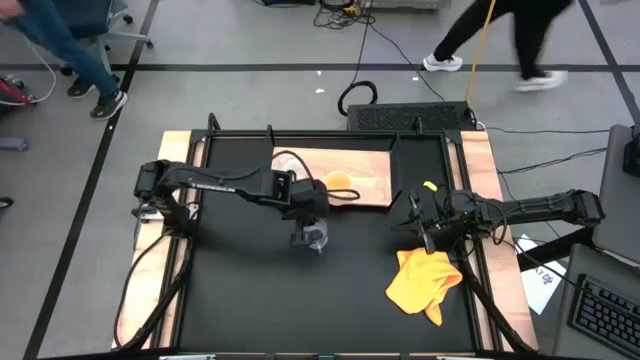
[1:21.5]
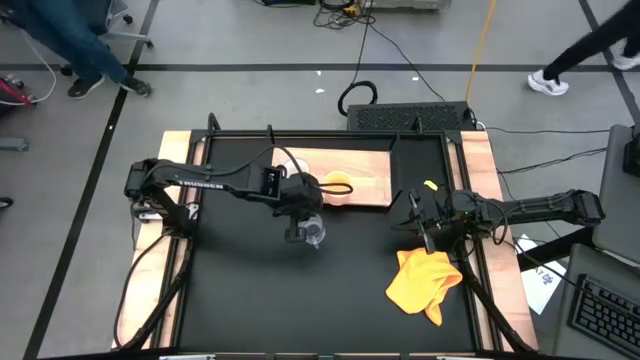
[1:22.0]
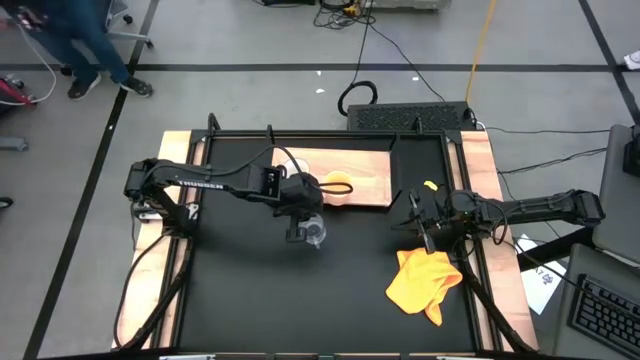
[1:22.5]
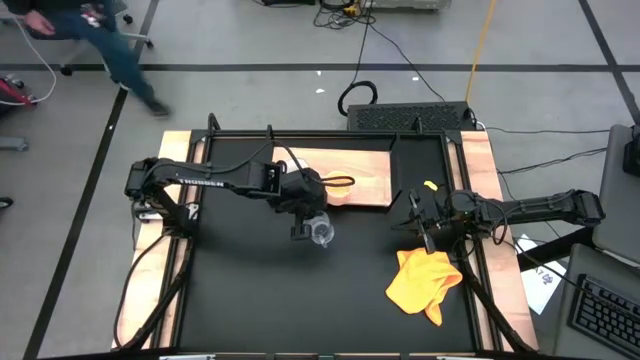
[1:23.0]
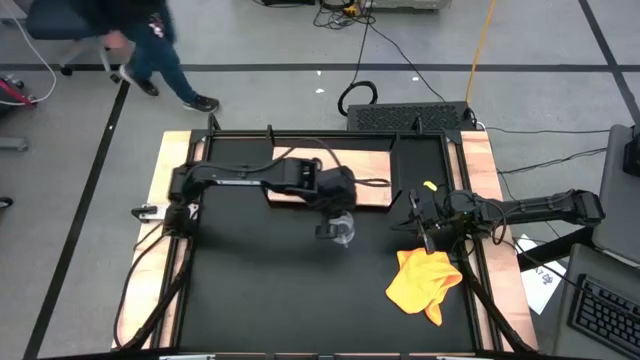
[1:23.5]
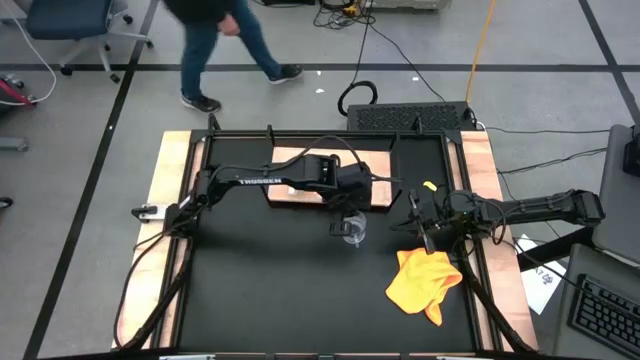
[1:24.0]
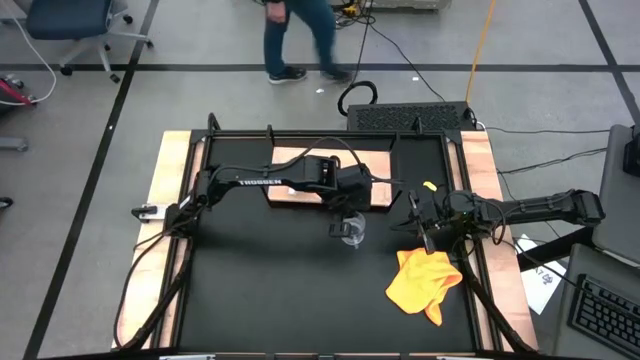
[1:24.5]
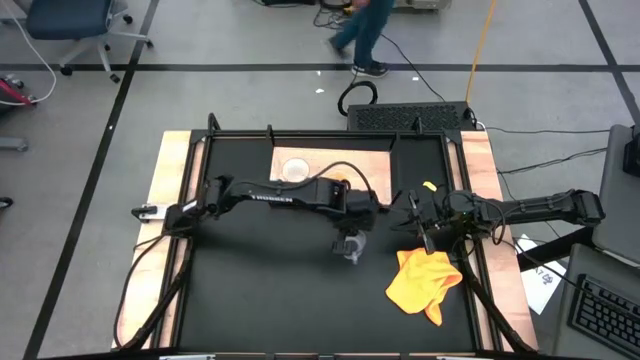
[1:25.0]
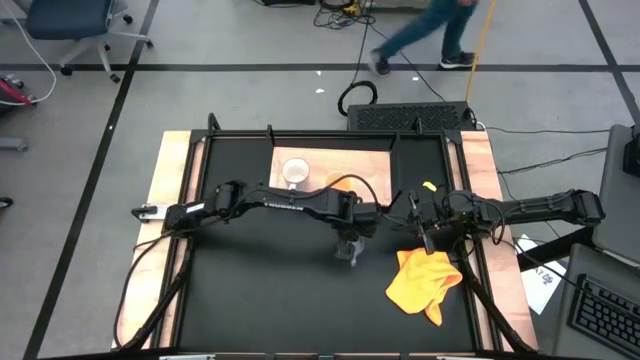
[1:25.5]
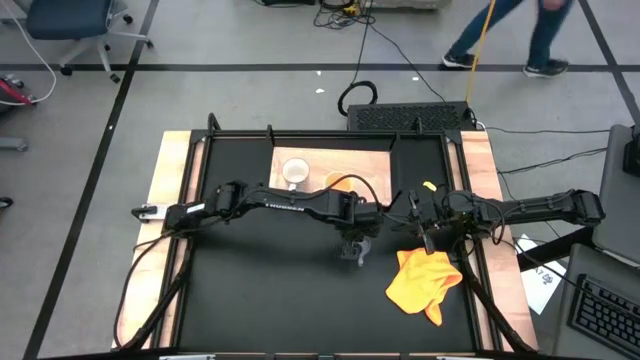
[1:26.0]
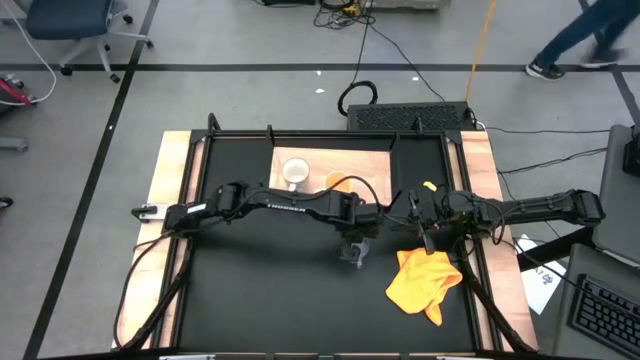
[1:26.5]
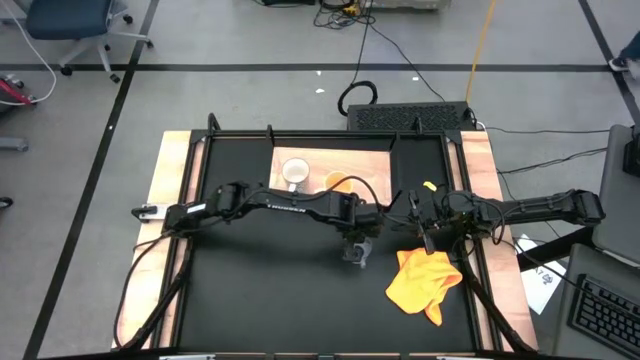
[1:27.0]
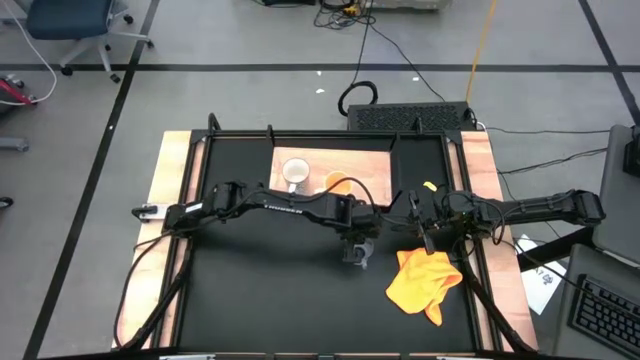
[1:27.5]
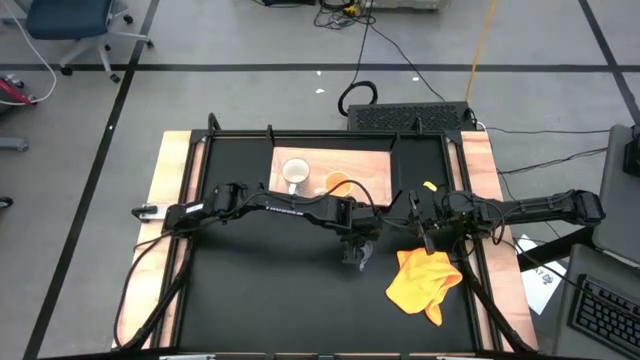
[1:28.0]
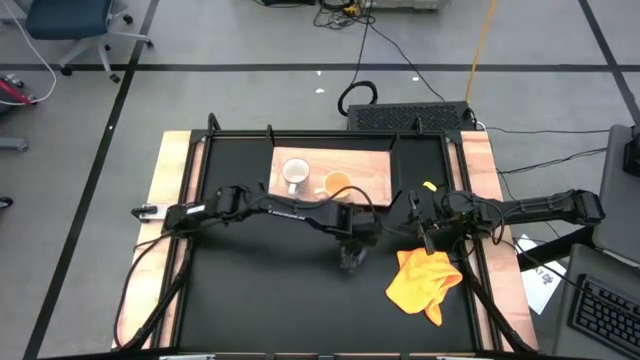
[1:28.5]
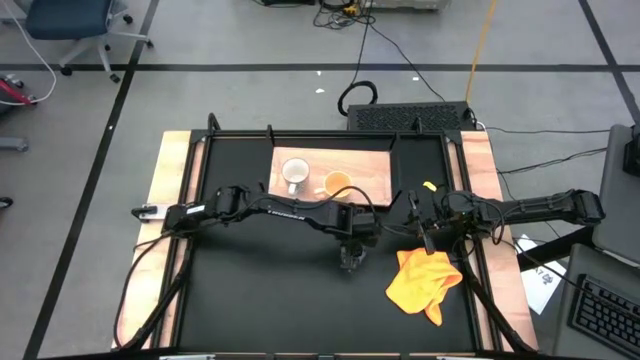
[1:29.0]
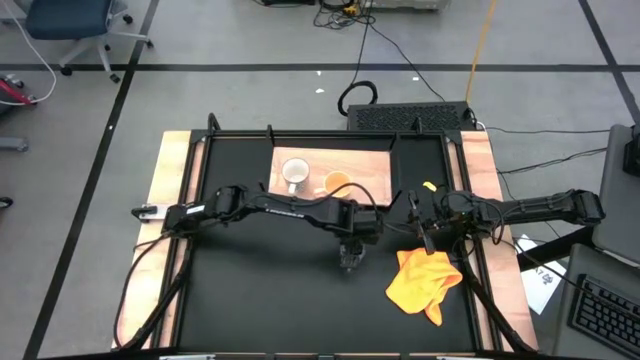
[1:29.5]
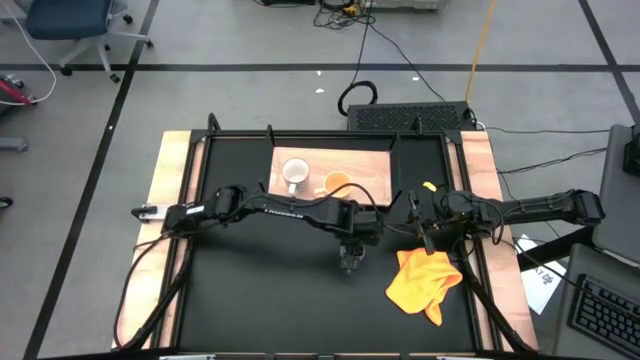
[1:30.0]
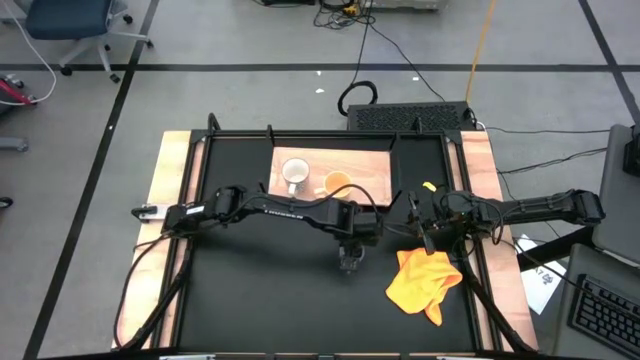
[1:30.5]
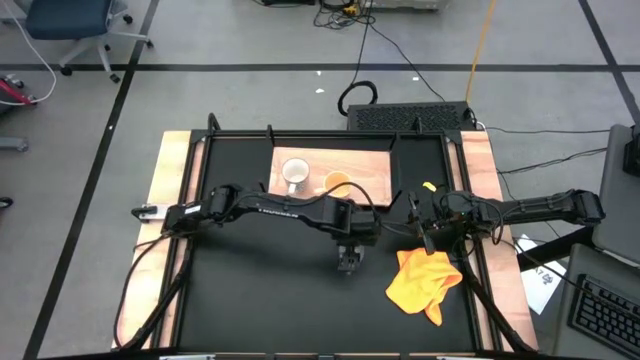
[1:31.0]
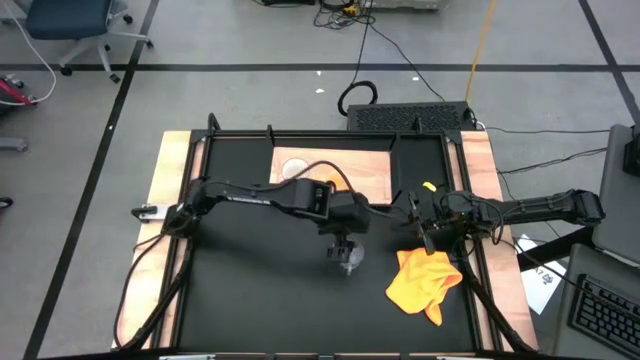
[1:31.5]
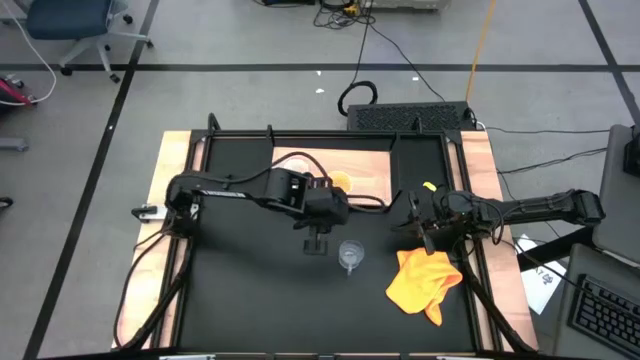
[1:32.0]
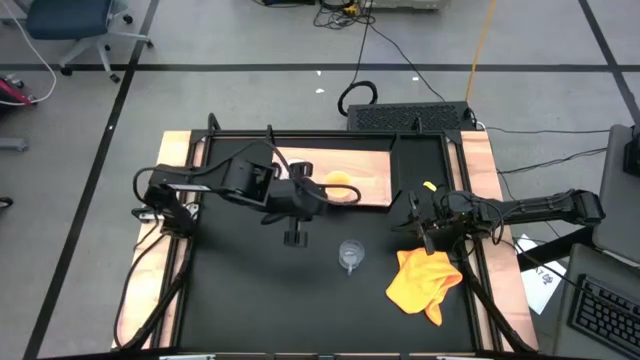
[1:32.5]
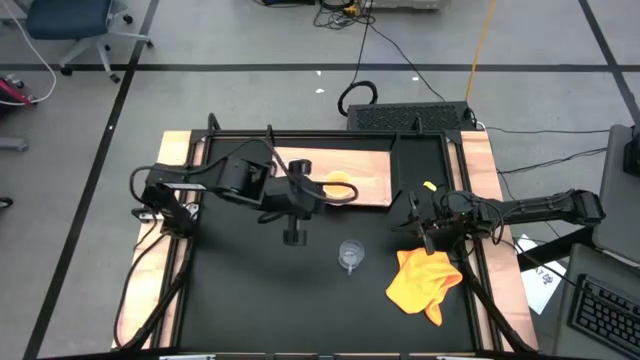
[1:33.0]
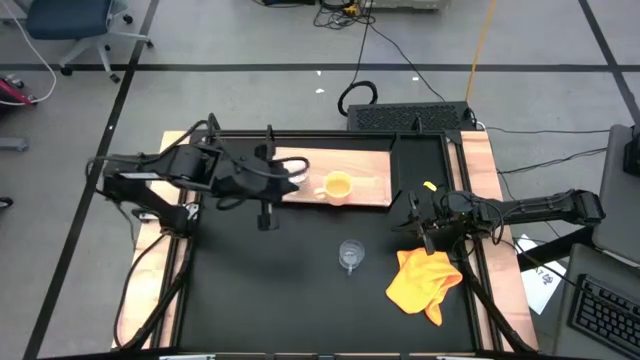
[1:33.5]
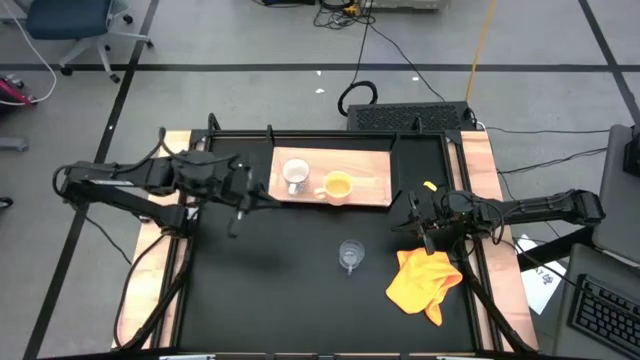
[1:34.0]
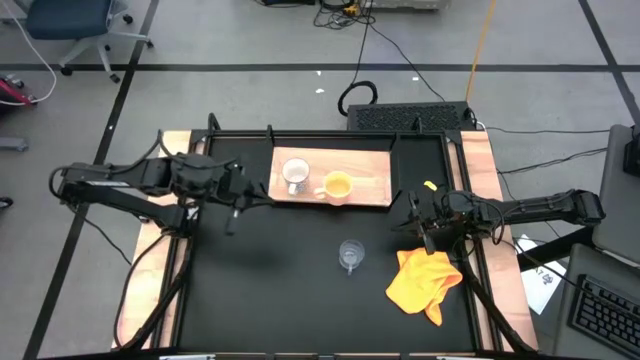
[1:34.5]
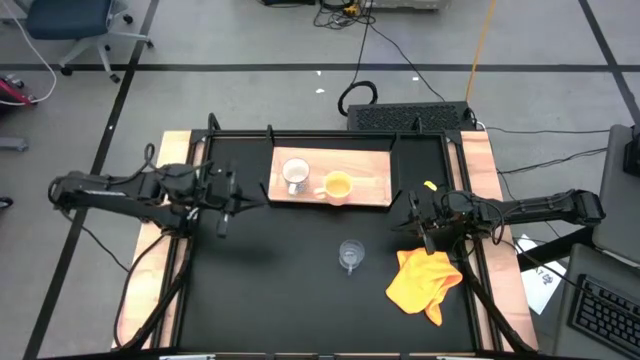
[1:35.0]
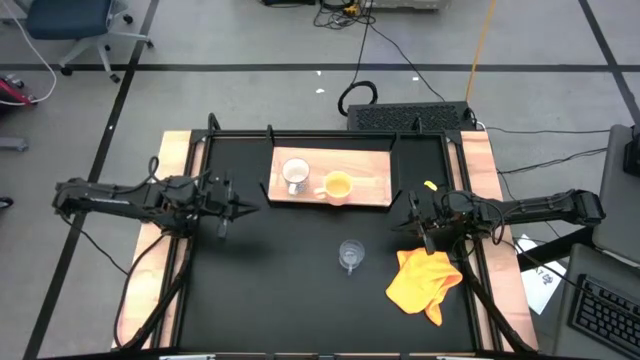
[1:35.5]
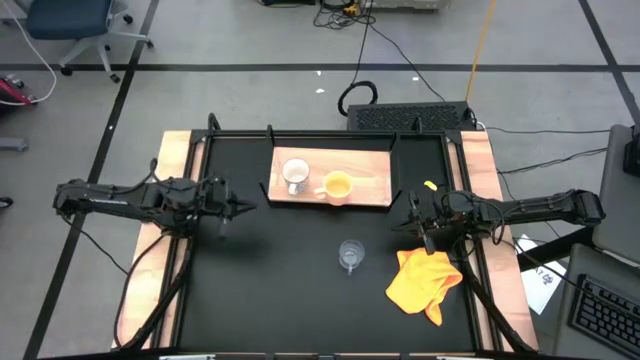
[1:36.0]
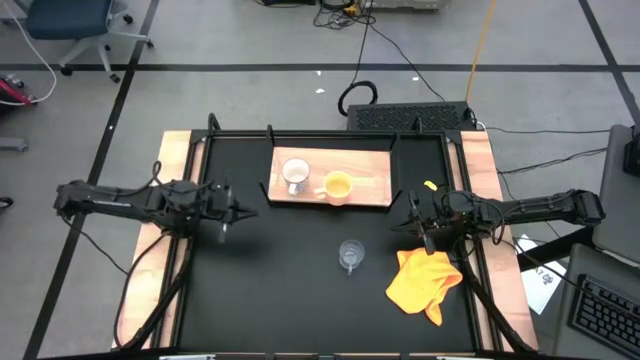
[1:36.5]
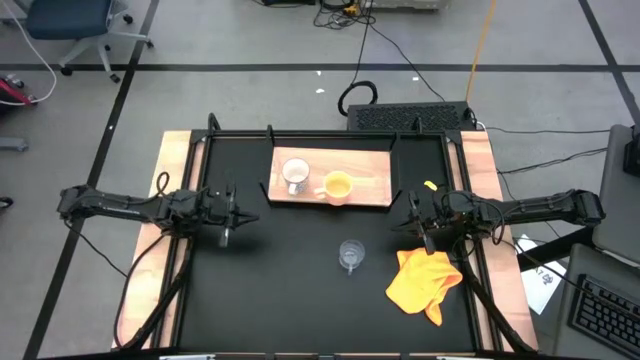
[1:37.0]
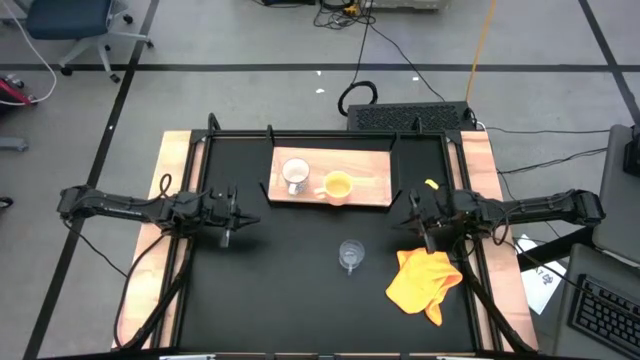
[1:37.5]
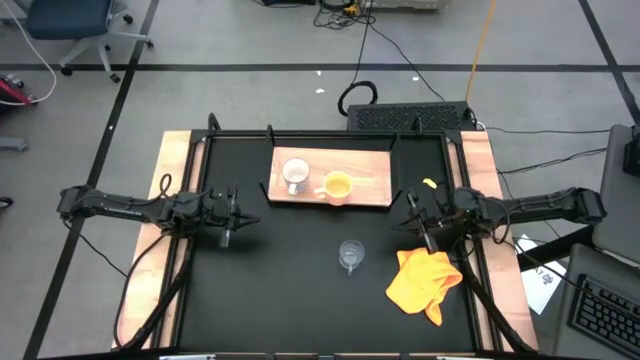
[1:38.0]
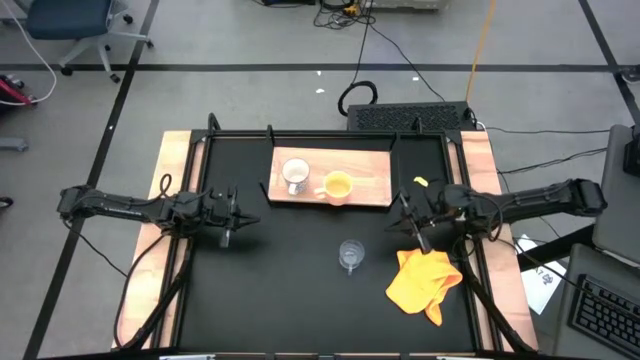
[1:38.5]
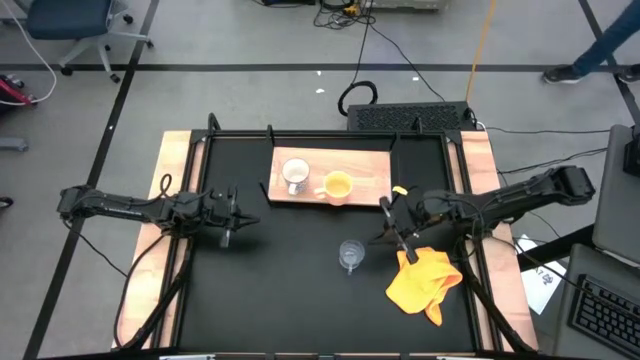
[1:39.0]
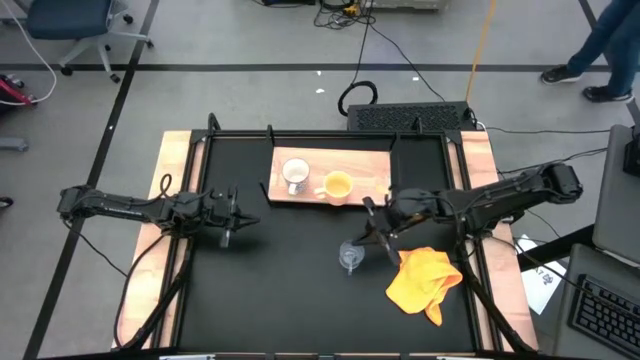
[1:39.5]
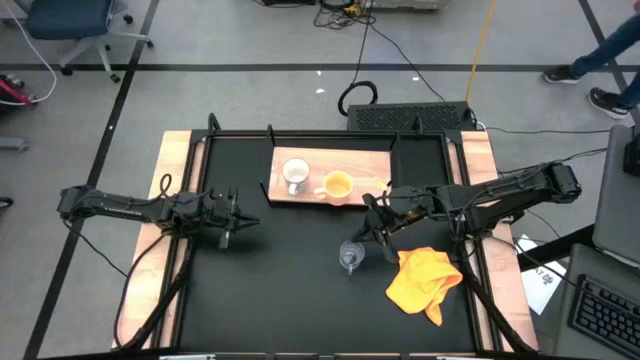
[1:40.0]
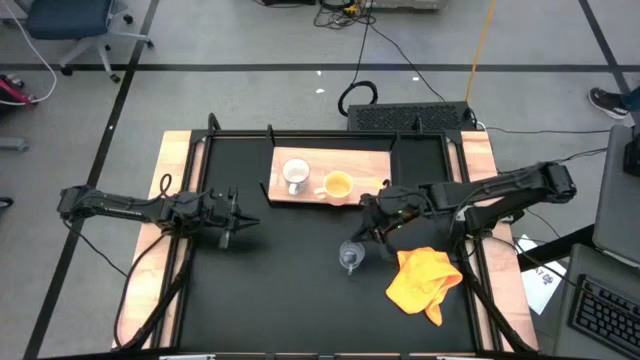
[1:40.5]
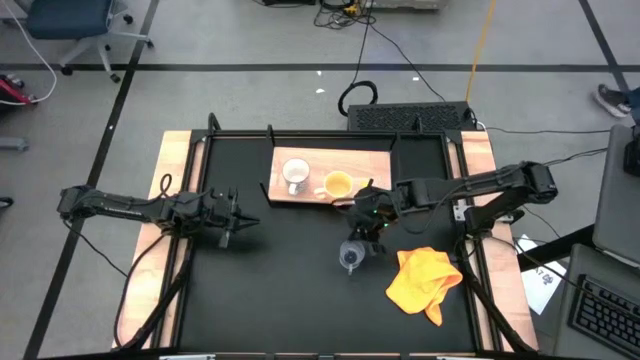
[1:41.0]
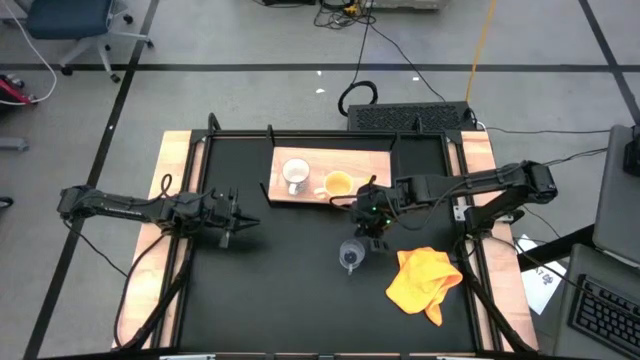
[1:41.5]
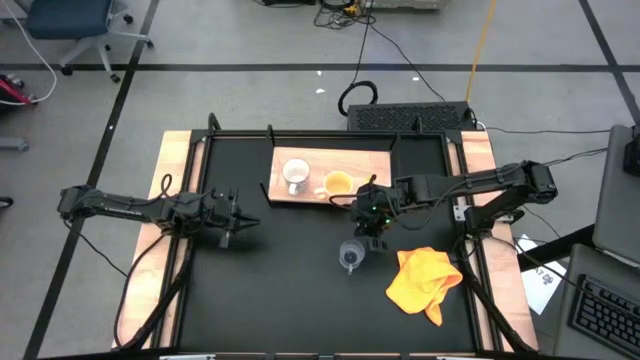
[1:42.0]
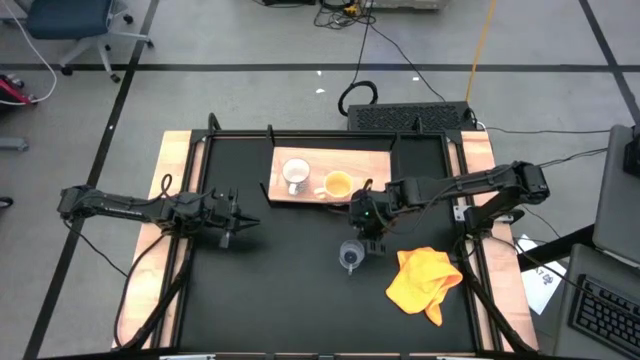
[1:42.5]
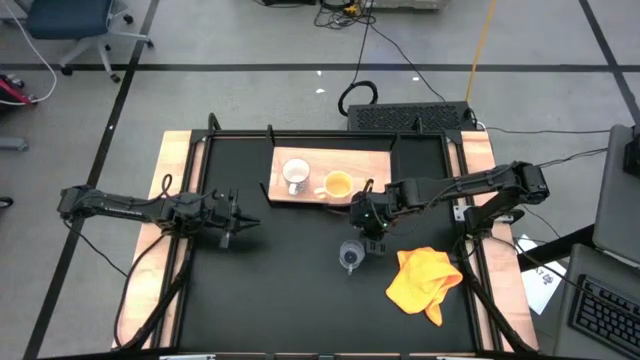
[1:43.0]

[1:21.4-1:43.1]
Task: Stack small to large cups/mugs on shelf
Put the transparent mug on the shelf
